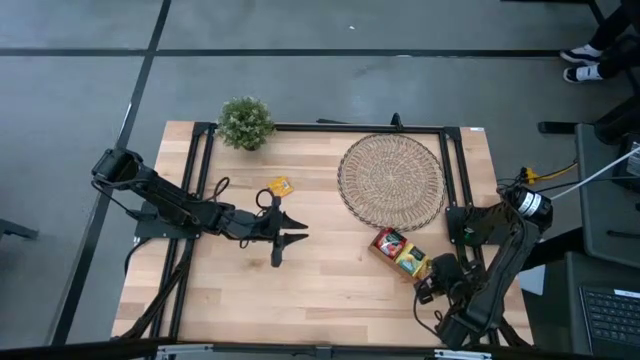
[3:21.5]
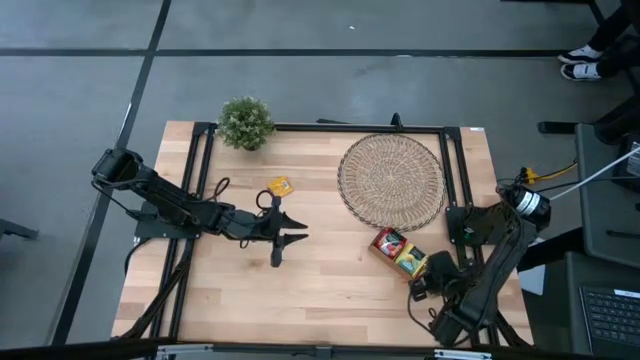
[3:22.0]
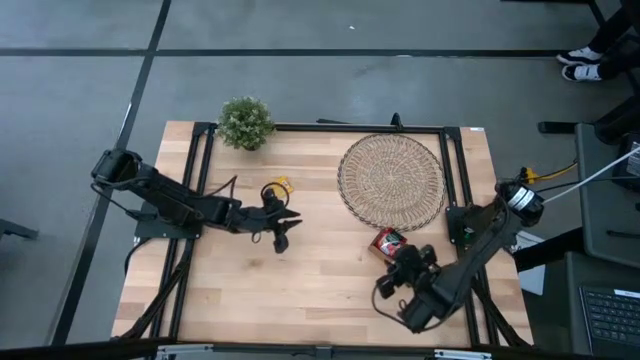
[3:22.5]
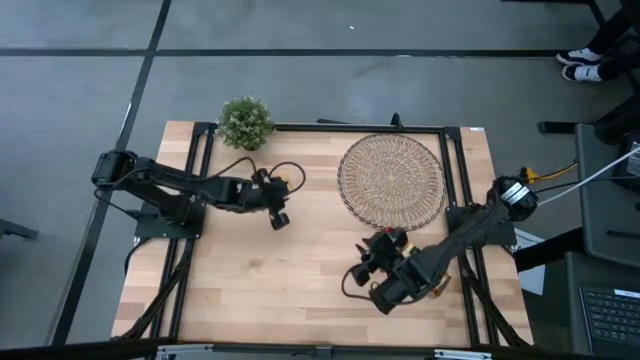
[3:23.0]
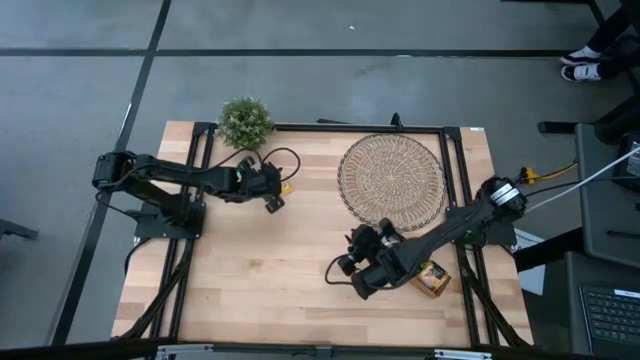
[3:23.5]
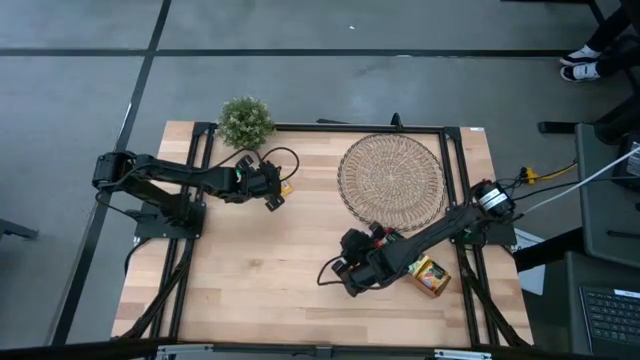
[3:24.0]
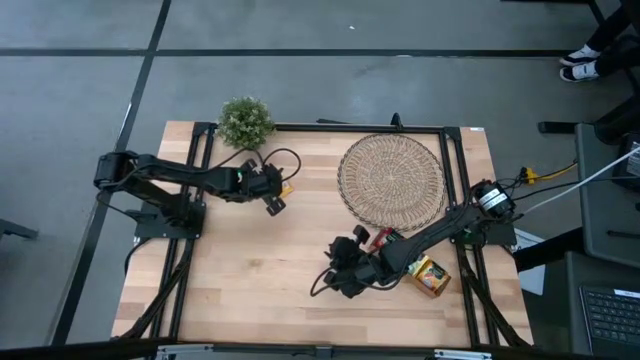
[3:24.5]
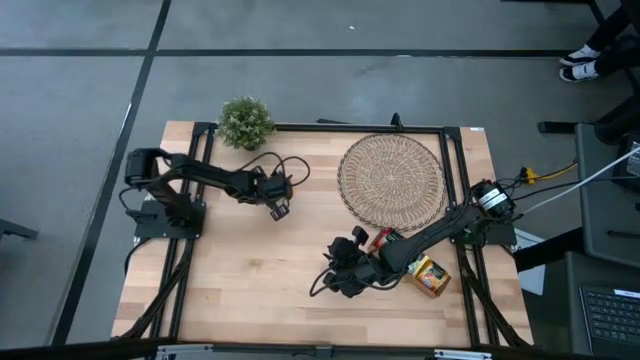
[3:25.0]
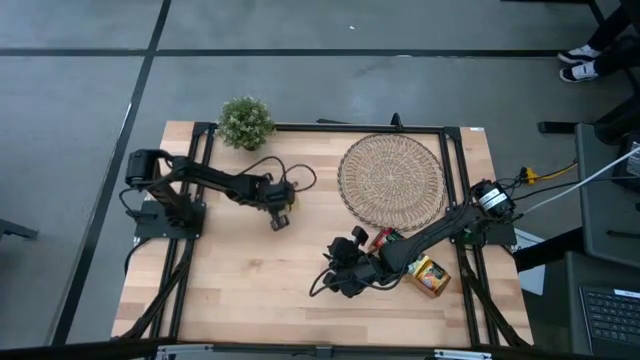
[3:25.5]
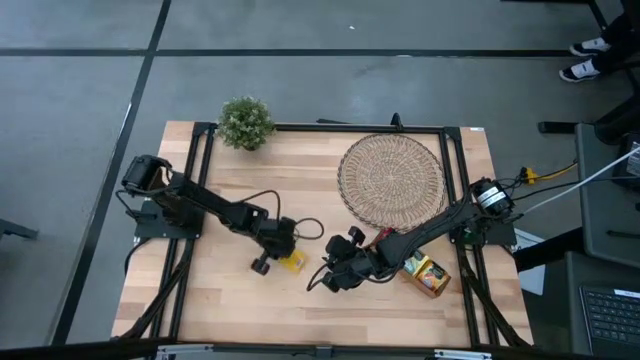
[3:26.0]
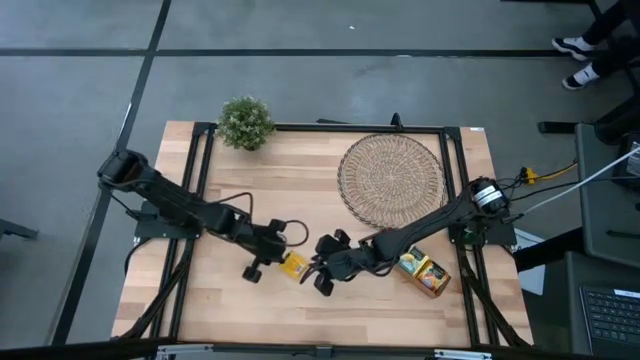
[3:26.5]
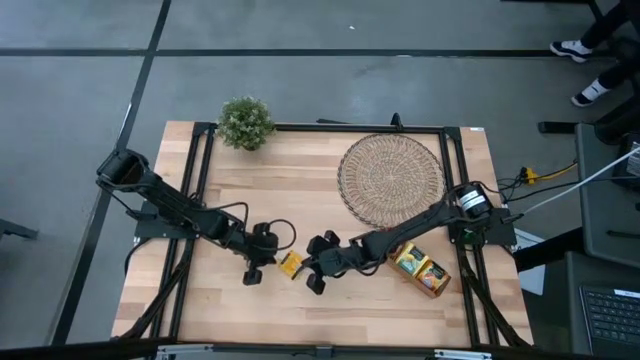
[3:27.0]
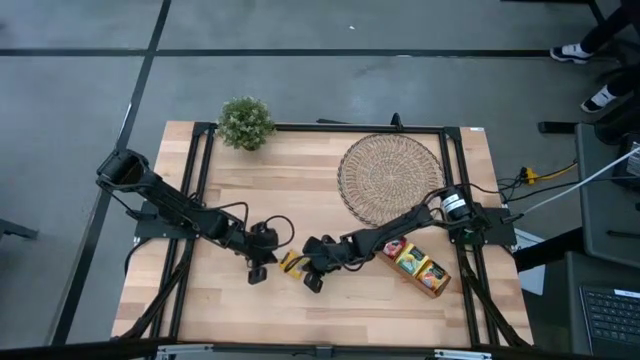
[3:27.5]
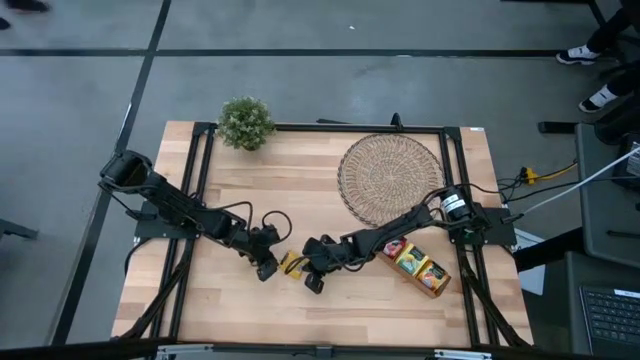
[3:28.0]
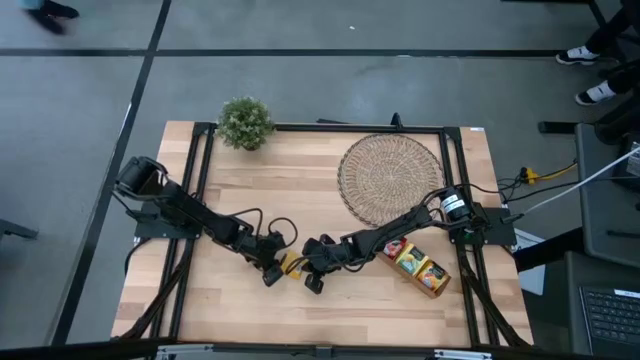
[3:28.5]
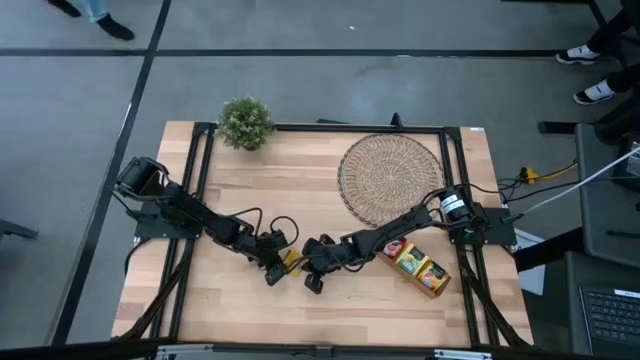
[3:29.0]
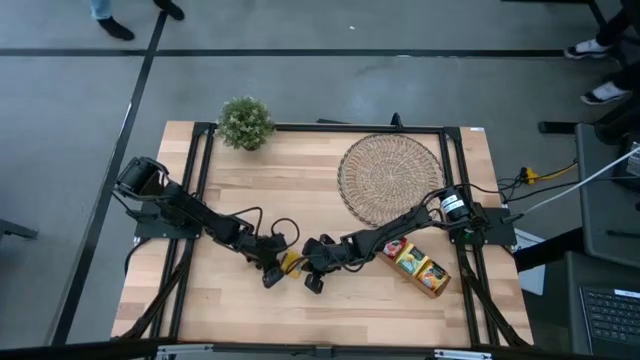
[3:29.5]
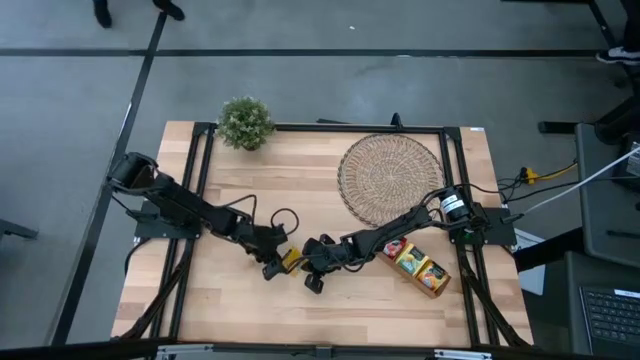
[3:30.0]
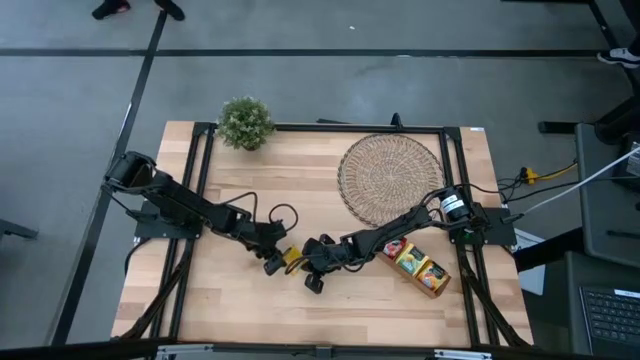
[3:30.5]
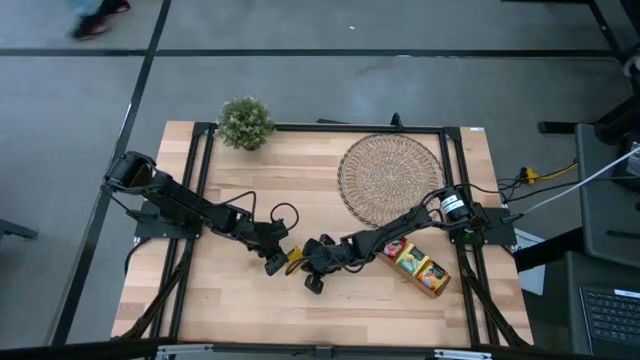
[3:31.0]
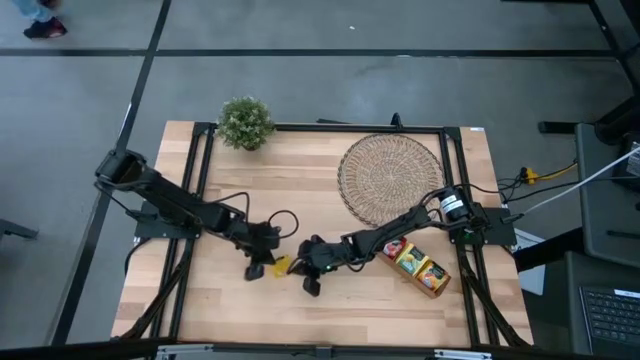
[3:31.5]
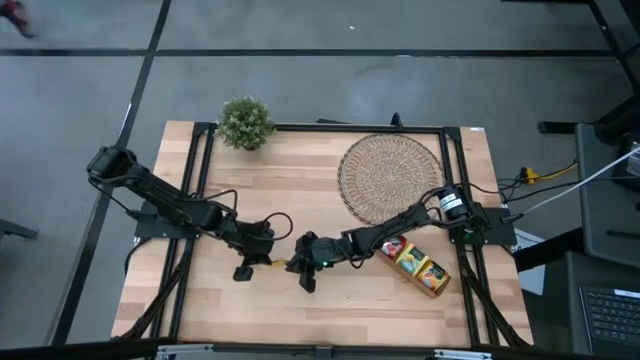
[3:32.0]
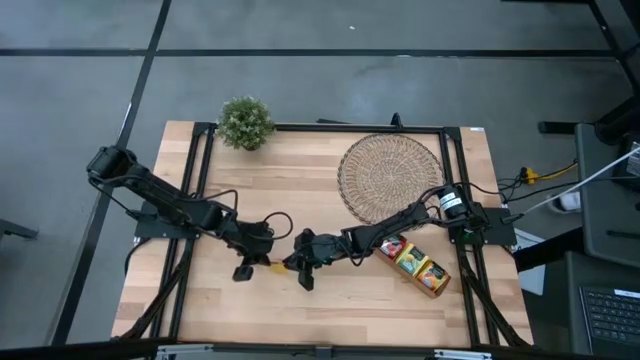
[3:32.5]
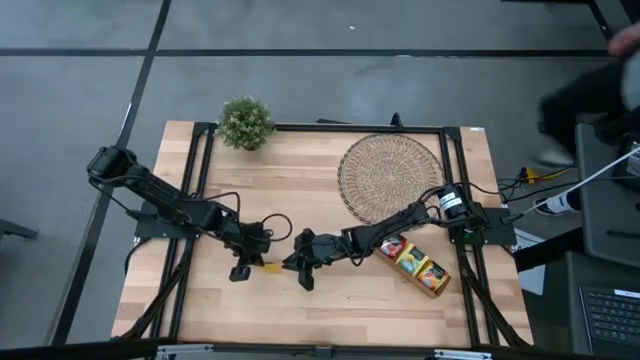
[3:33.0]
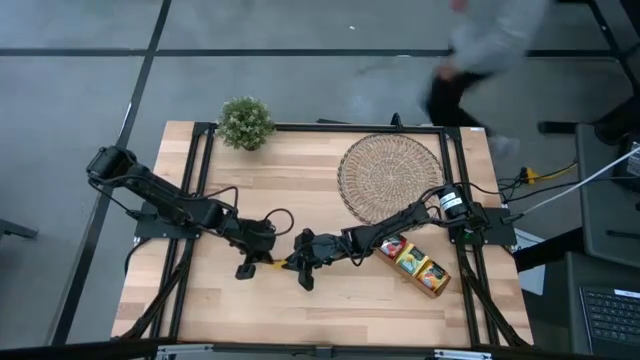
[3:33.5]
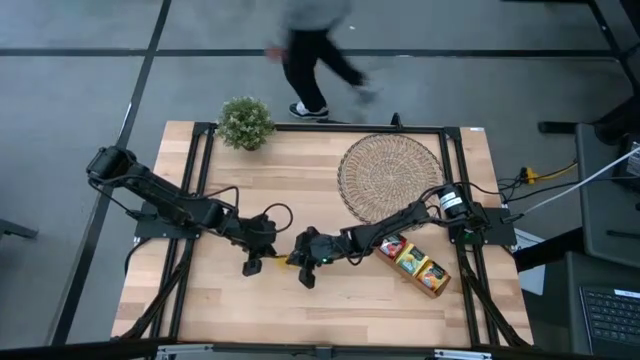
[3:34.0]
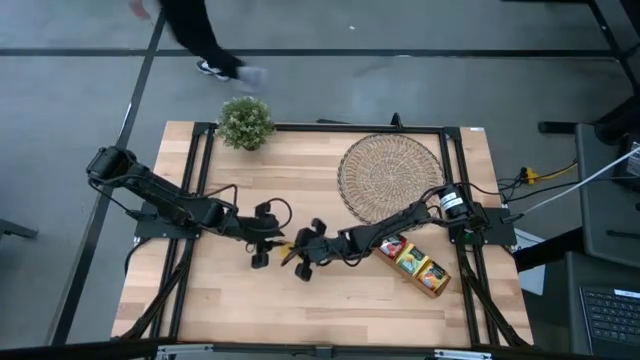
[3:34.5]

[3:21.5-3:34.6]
Task: Pick & Place Tea
Put the orange tea bag into the right slot of the wooden organizer

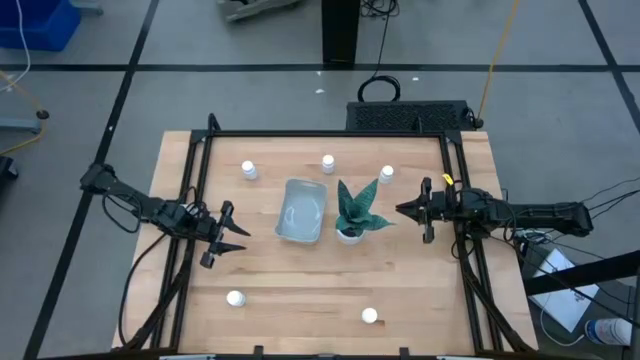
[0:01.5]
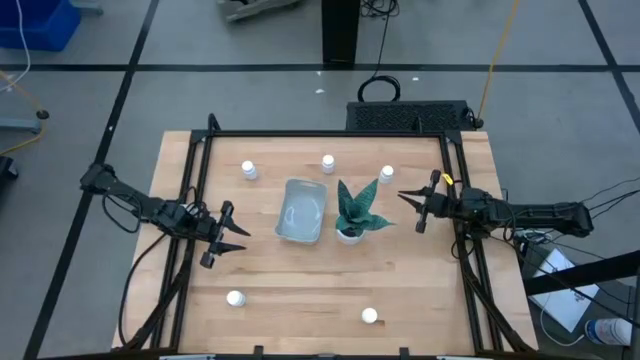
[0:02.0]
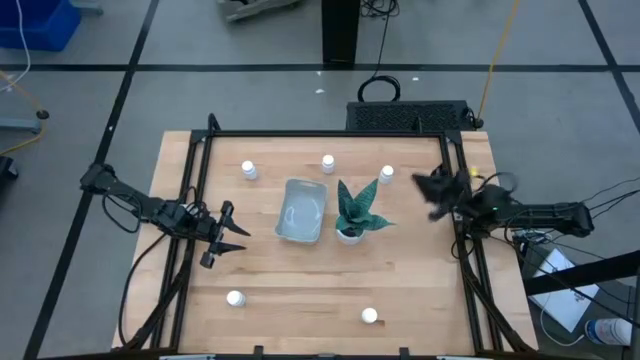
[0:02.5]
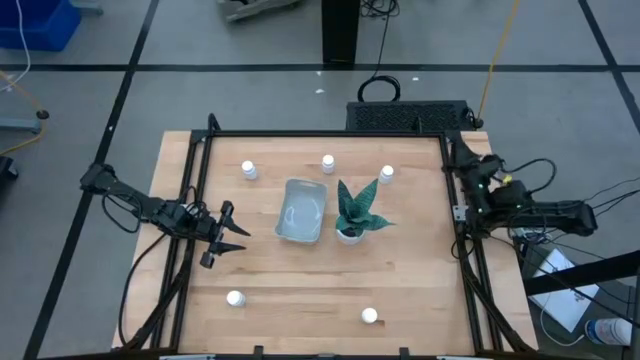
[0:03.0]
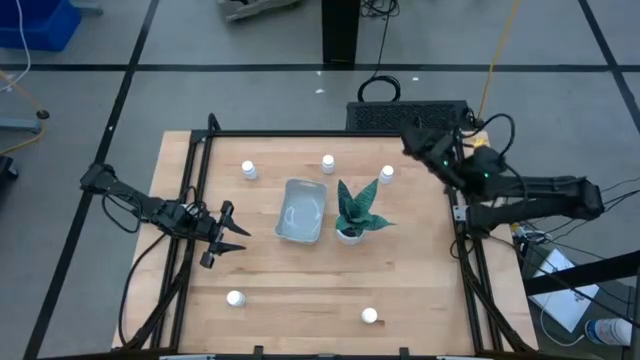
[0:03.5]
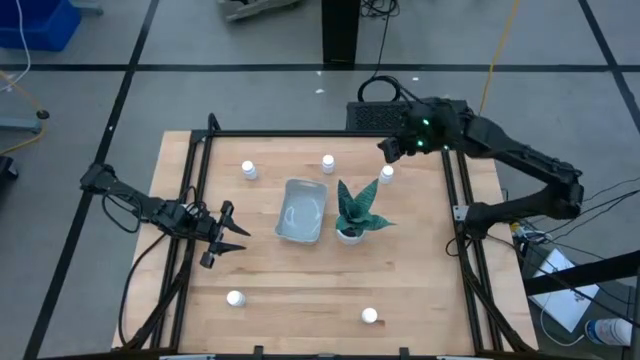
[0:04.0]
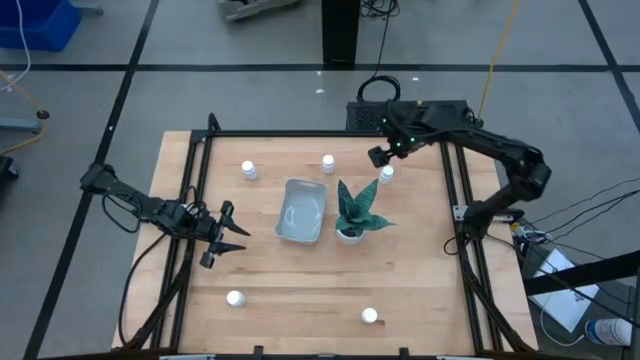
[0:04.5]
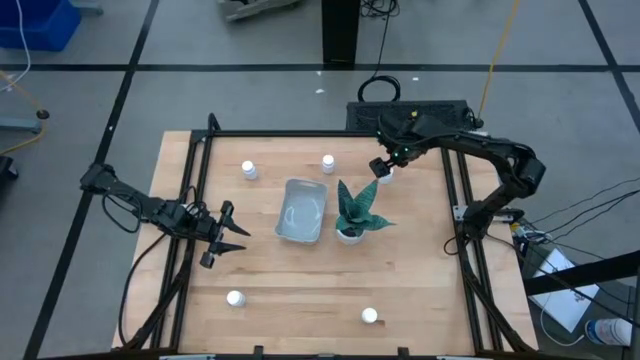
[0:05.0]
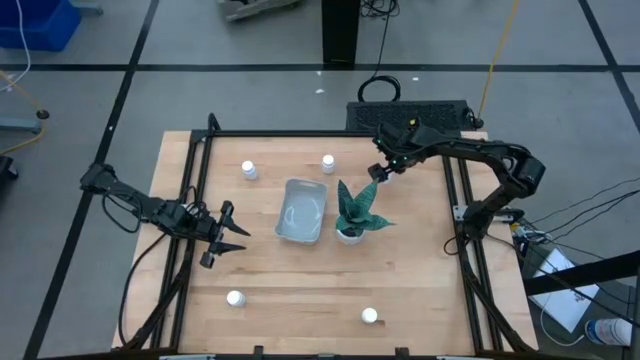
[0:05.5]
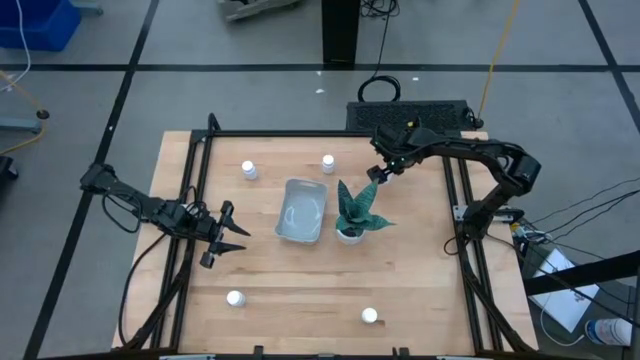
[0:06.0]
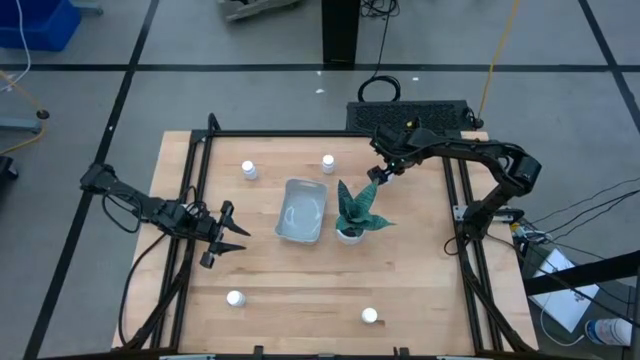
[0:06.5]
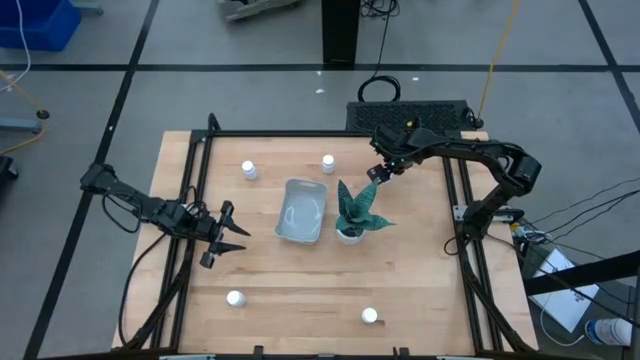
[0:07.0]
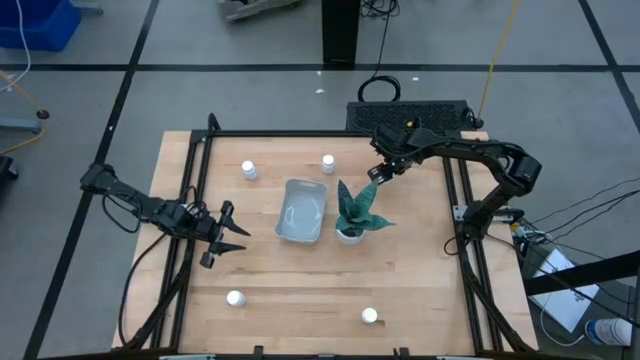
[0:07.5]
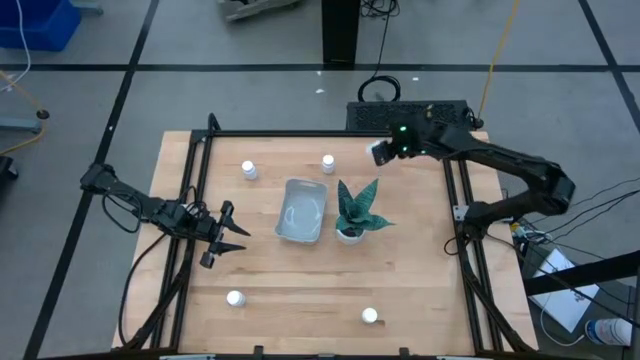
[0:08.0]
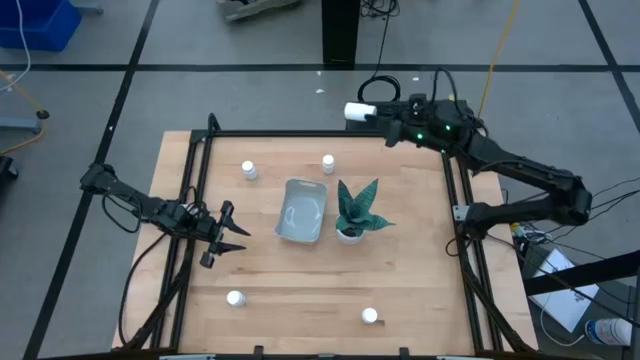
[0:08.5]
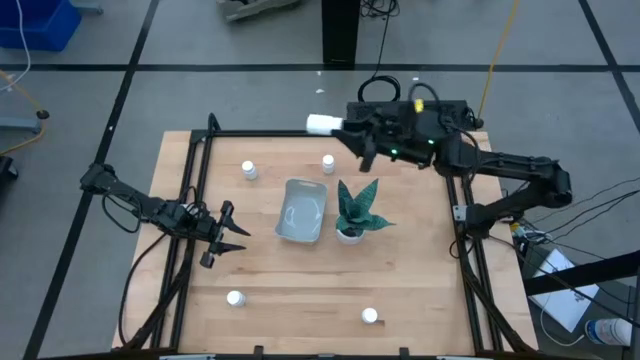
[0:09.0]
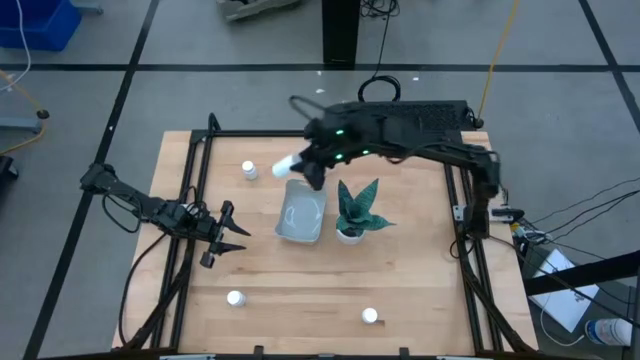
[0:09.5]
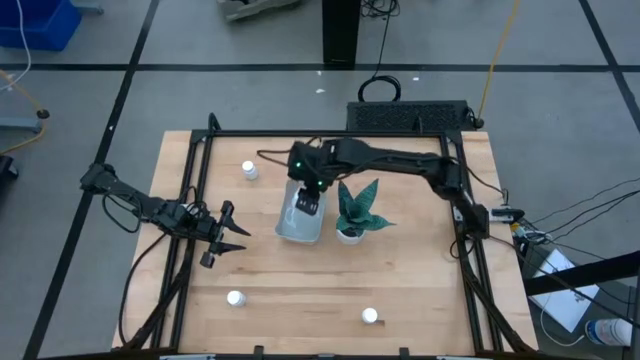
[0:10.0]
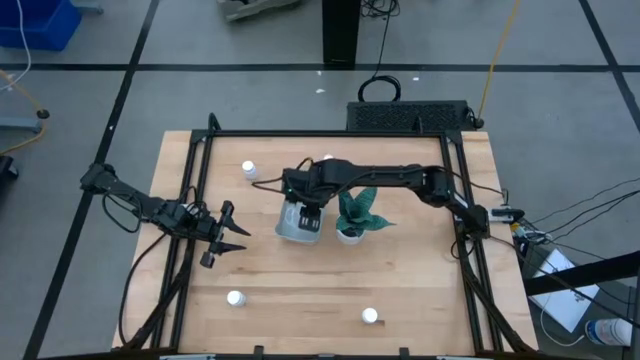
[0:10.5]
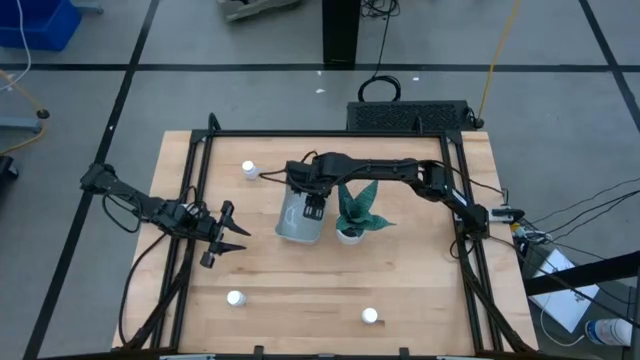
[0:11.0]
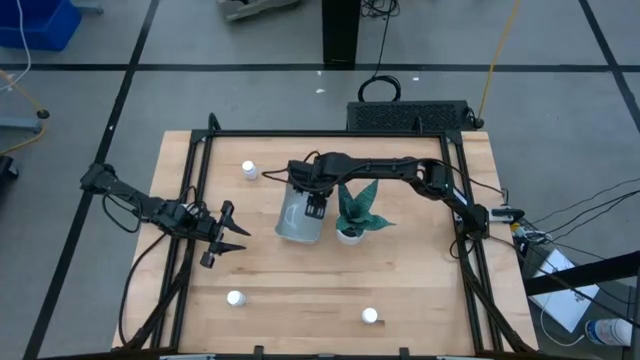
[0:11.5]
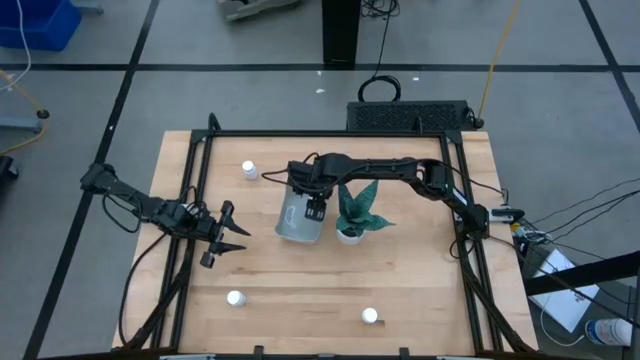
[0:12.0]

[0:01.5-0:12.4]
Task: Pick and place pill bottles into a basket
Put the white pill bottle into the gray bin
